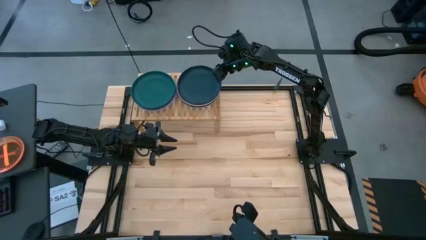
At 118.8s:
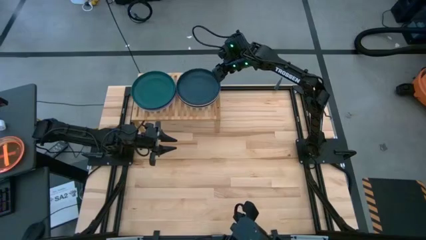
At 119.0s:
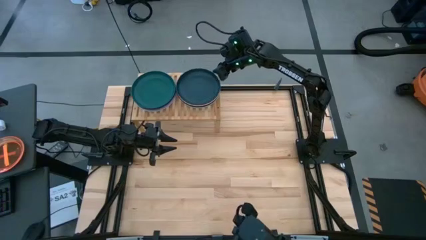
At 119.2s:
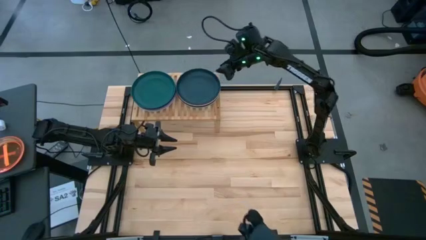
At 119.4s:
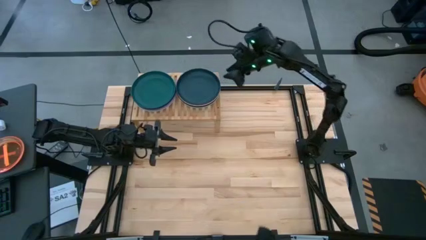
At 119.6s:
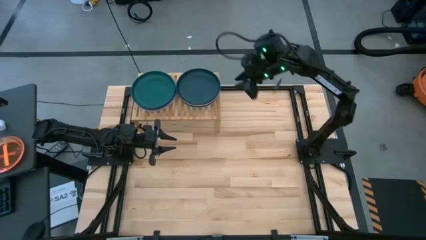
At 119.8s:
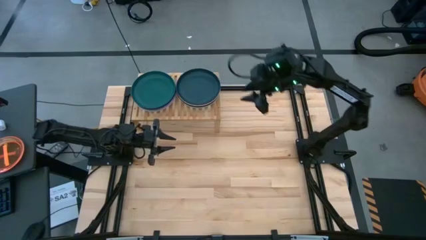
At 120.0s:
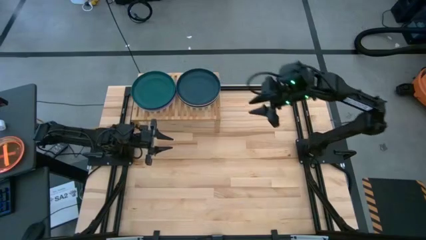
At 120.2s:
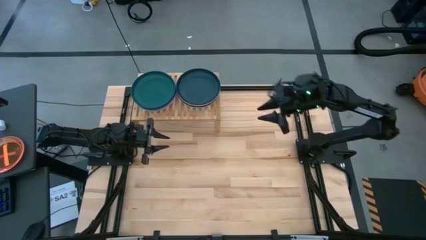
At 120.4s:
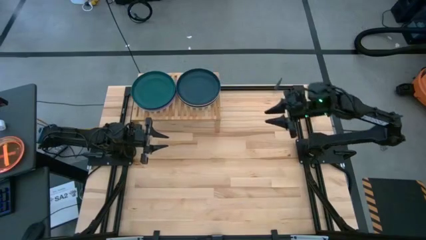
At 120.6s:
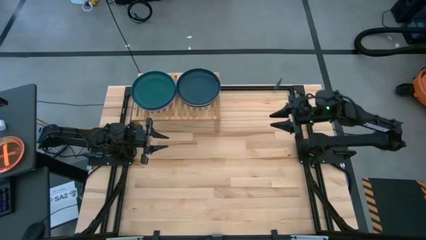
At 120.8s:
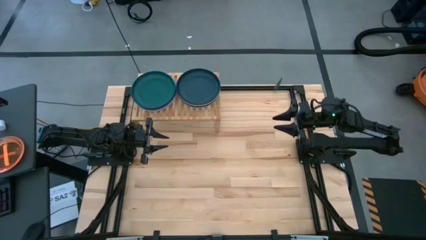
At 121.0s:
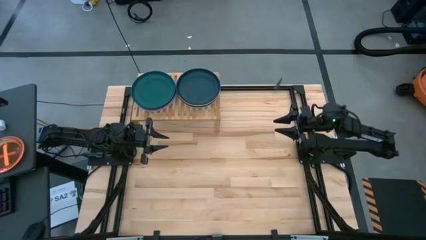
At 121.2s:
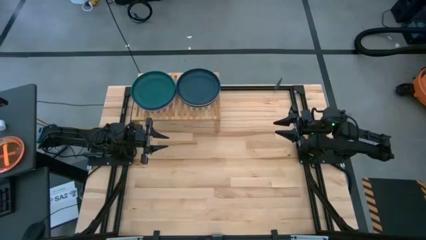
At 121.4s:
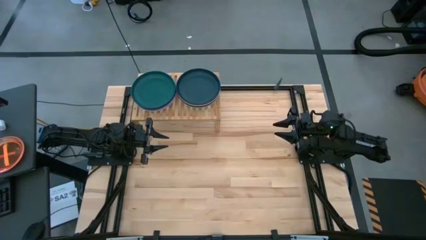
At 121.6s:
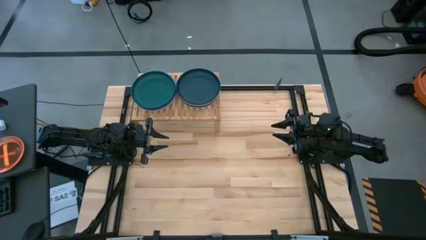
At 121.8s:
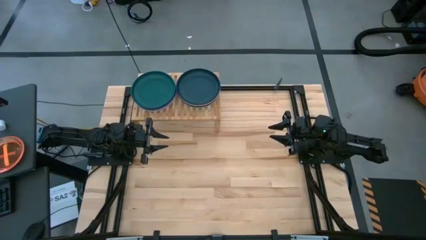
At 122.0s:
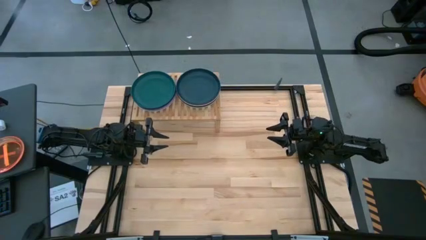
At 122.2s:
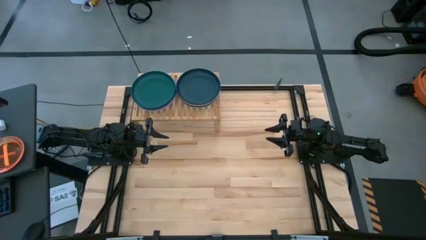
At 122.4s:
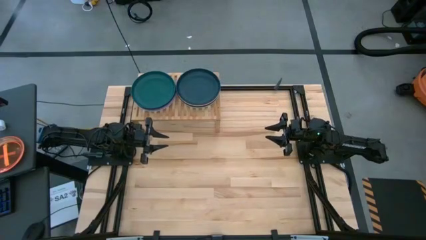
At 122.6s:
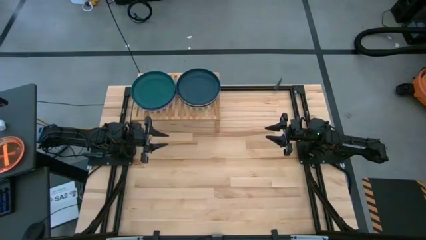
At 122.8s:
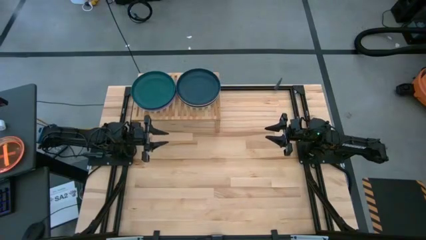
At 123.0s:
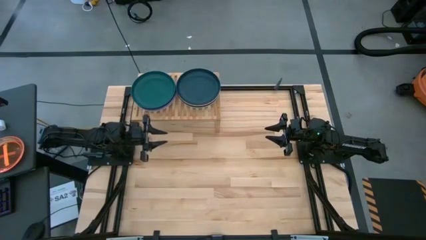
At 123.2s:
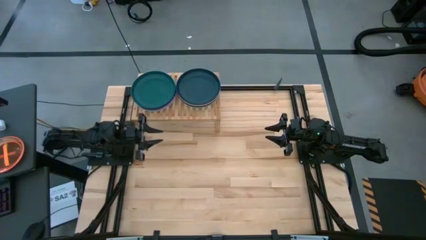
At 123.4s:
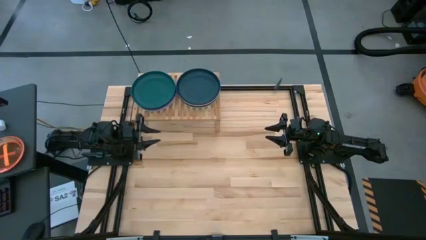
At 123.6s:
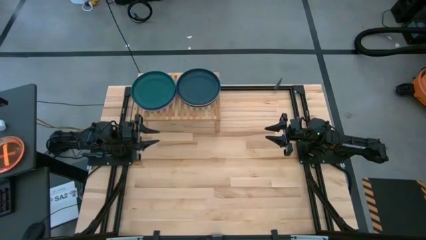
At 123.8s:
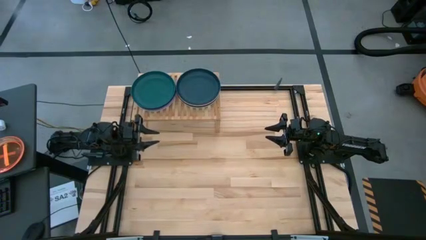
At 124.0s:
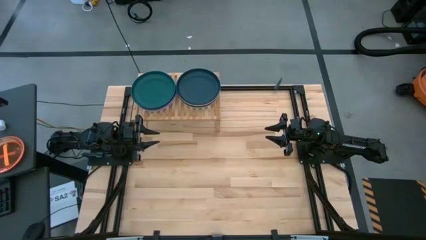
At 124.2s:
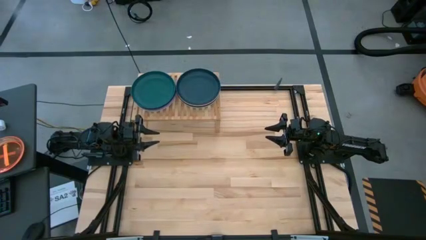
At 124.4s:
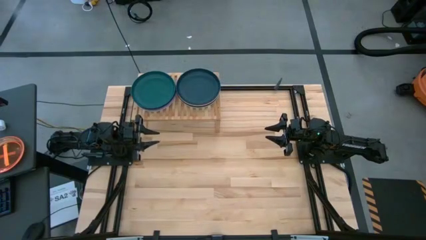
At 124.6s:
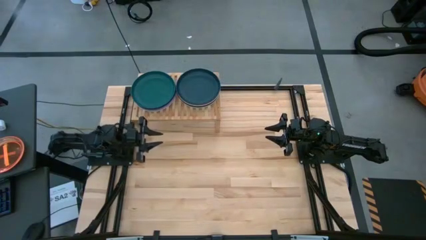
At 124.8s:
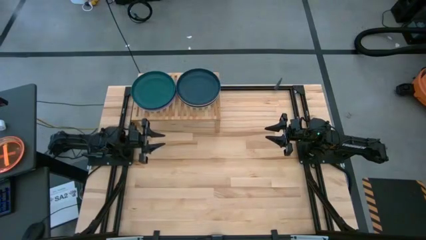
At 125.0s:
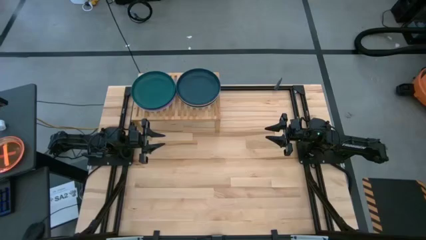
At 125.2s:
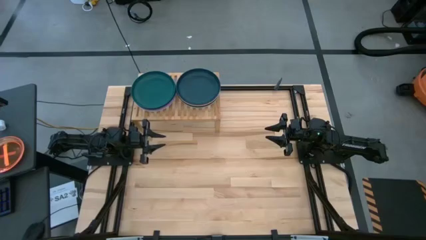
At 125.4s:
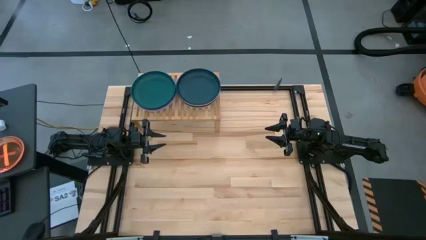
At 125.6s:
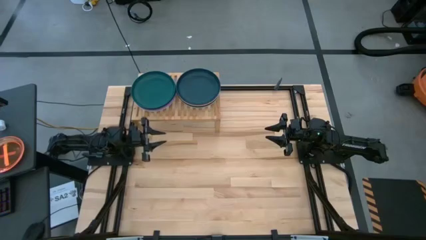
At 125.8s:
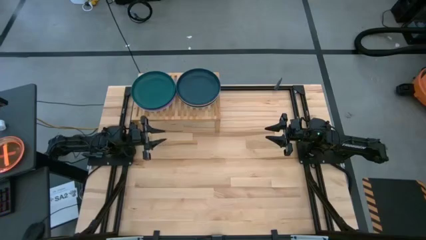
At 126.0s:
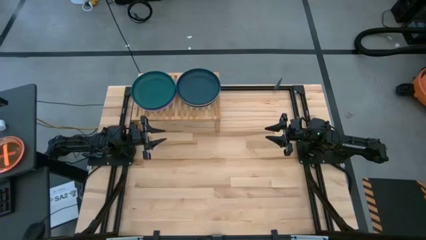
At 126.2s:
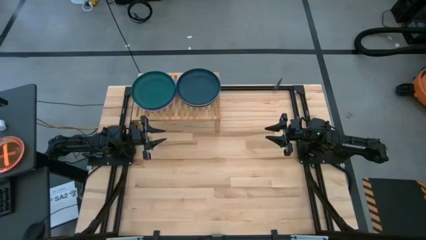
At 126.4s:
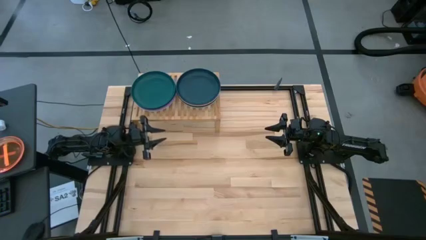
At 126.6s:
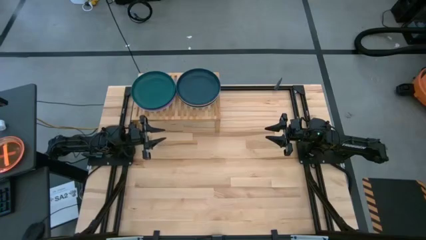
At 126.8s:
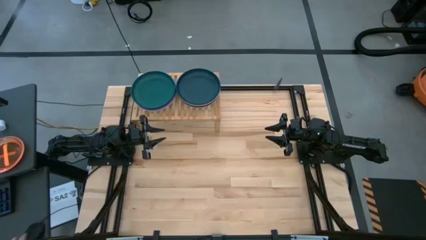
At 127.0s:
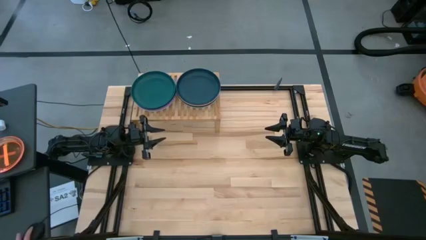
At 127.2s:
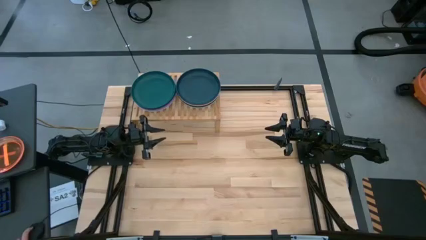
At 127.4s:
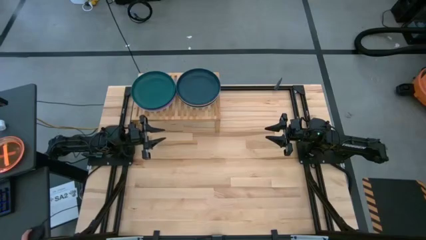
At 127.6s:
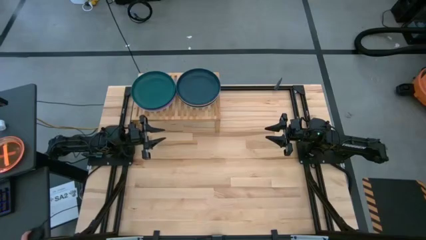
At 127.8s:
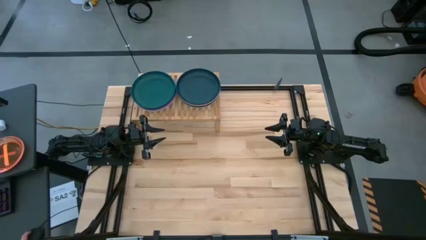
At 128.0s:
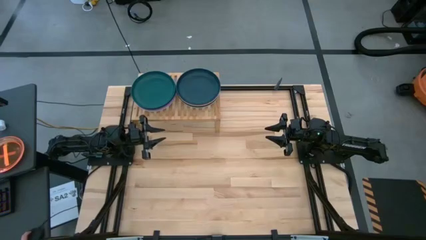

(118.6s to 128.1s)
Task: Place and stack plates onto a shelf
Return to Home Position

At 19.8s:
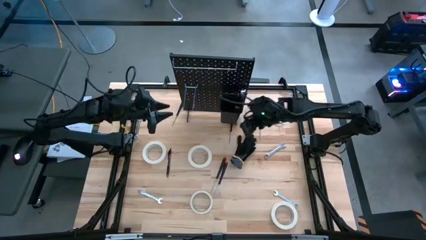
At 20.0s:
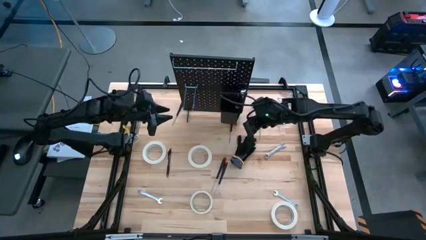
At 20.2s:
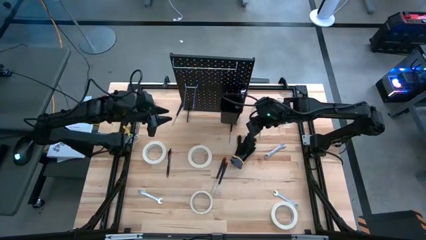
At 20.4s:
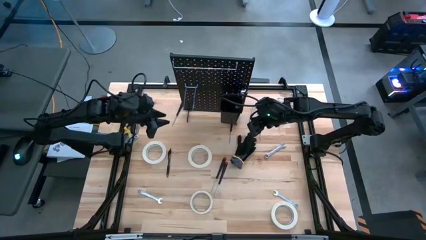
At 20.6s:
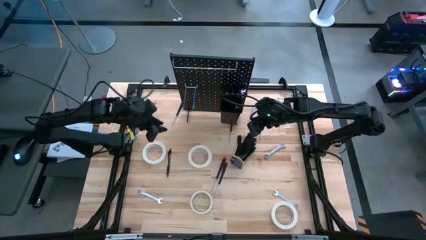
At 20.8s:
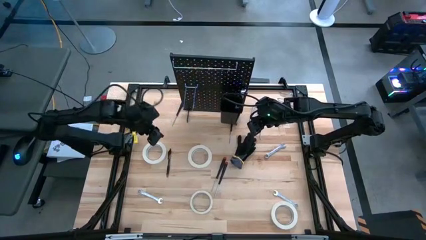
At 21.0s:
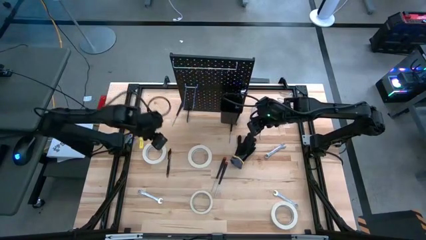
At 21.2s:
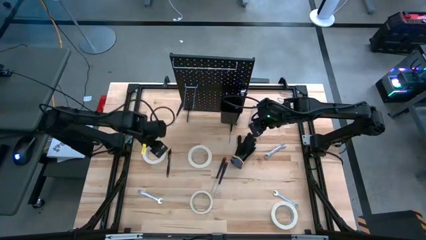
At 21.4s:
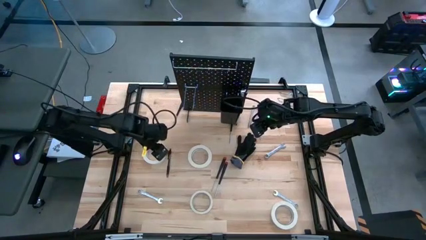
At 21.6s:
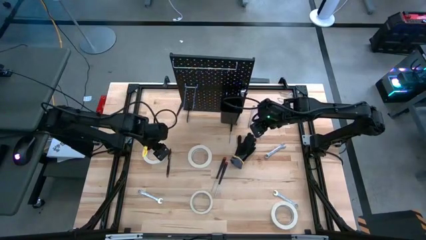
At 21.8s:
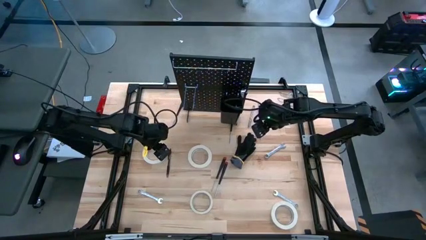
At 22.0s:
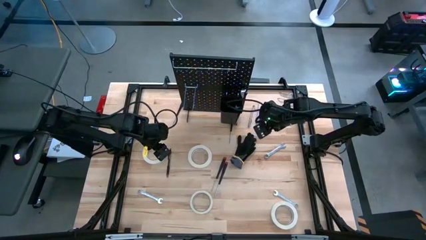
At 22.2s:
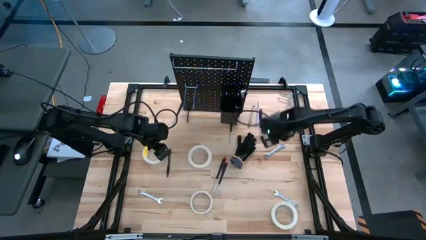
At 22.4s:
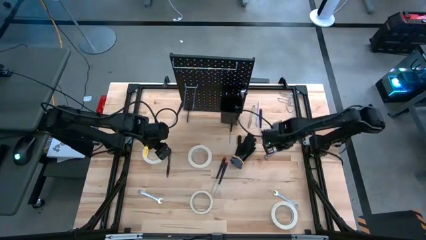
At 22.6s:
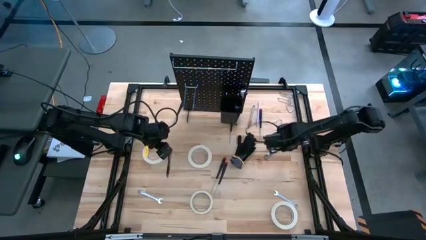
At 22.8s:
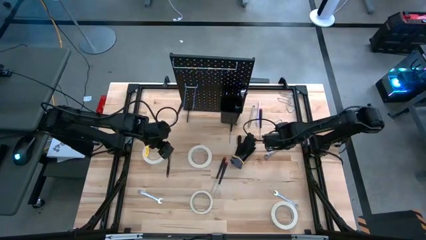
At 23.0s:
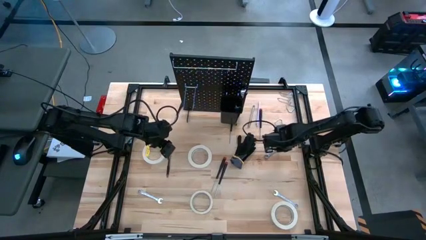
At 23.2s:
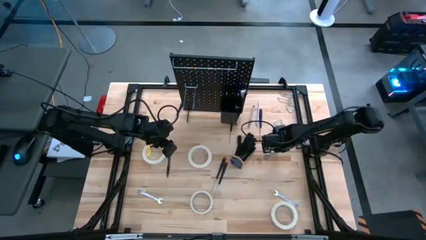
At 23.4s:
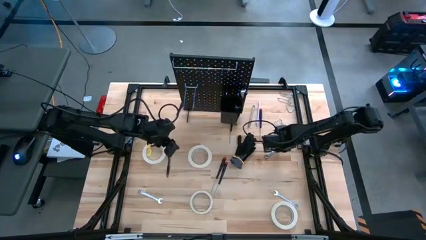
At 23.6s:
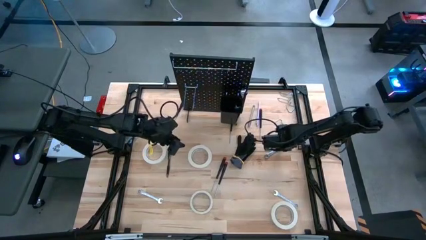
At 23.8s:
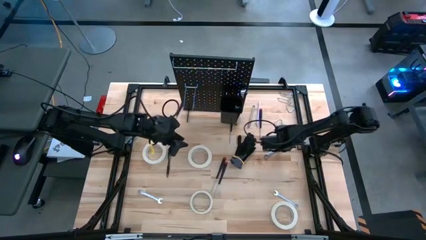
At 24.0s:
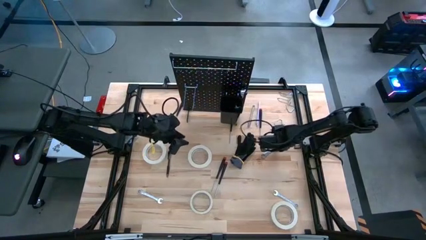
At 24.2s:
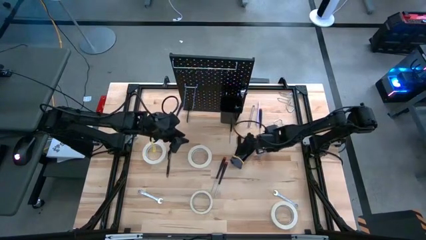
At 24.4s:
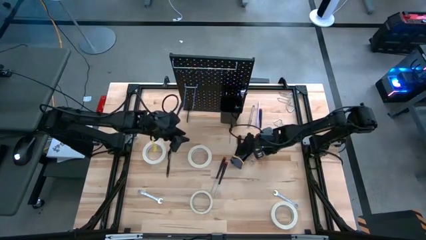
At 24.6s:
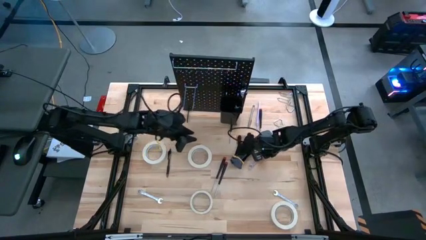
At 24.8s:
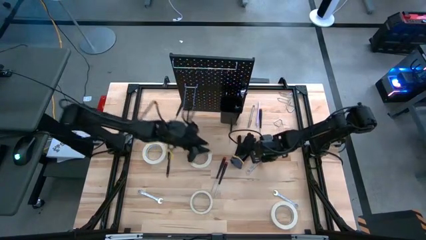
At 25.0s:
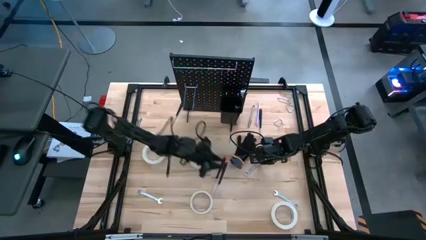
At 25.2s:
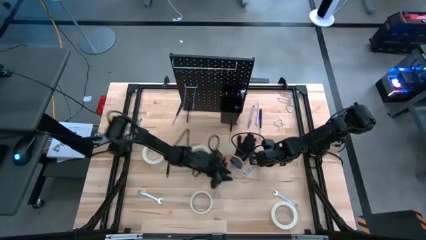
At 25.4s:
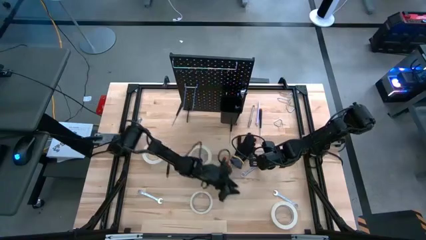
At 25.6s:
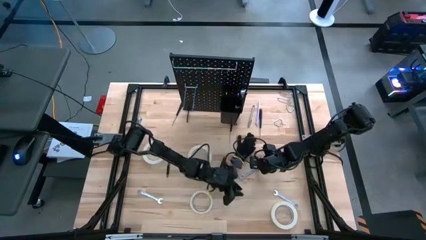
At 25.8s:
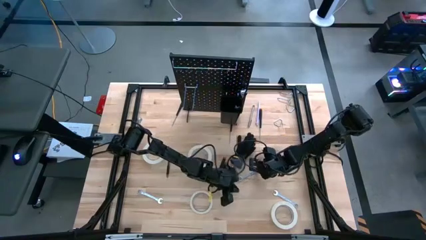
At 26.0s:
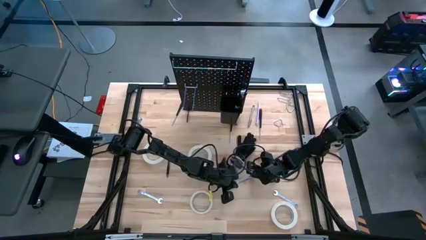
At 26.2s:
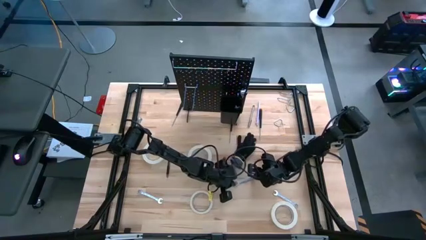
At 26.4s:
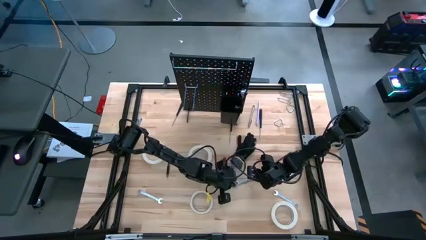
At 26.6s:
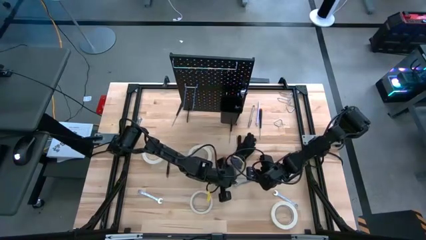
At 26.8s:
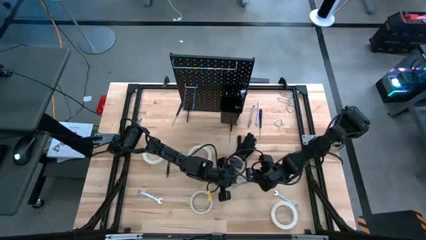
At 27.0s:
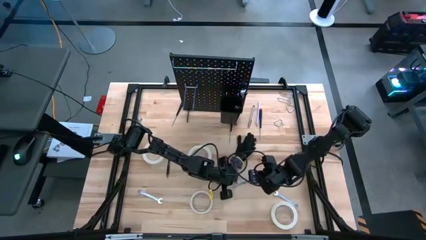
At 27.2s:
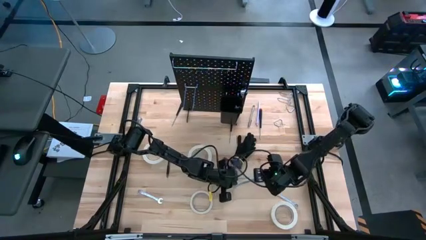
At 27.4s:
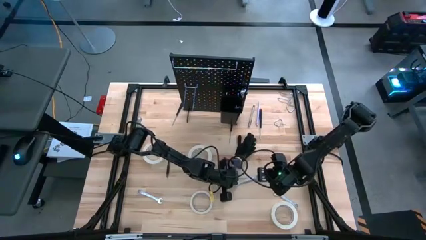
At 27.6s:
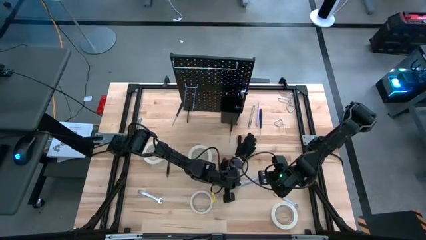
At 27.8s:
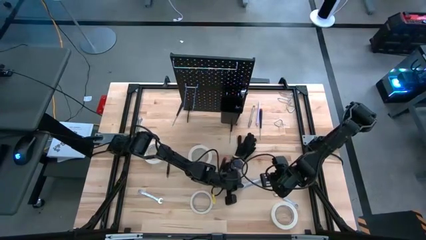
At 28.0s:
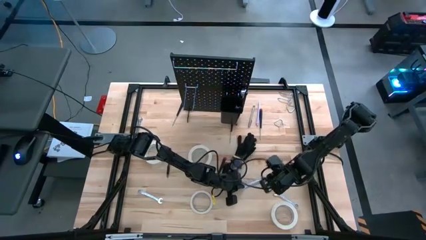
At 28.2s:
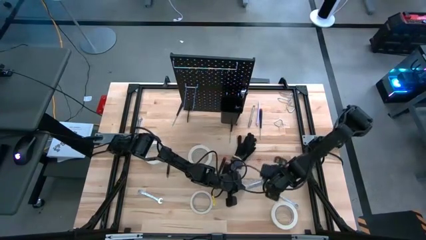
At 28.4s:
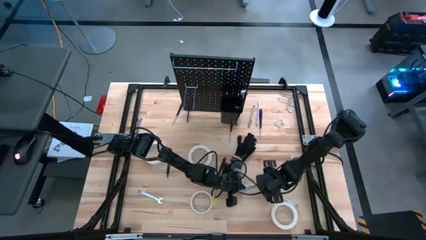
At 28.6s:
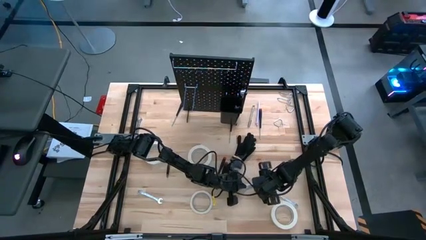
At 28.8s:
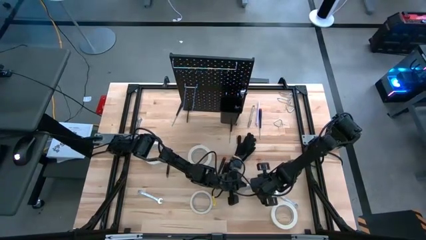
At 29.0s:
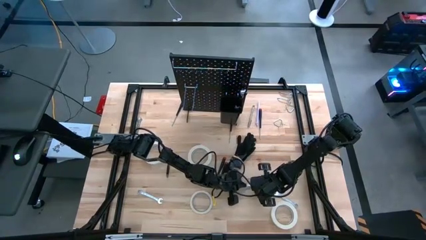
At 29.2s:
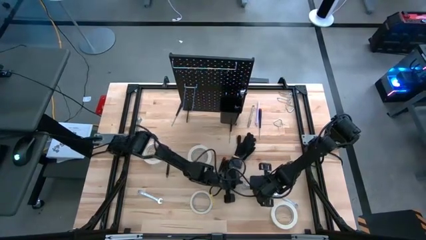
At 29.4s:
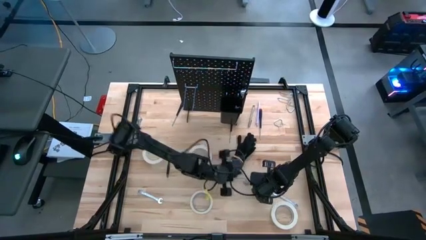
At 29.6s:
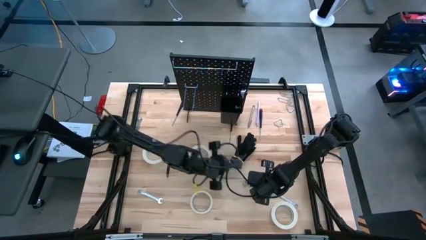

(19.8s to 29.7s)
Task: Hang tools onto peg board
Hang the 12 mm tool onto the pegboard on the top left
